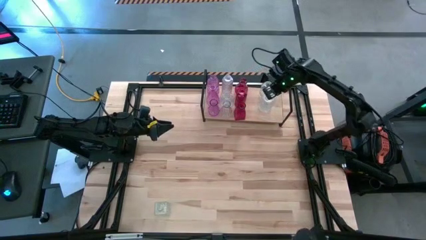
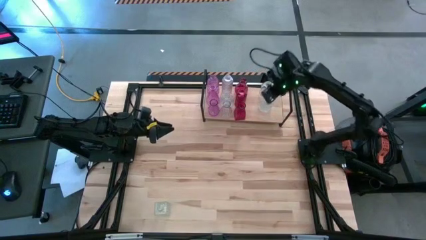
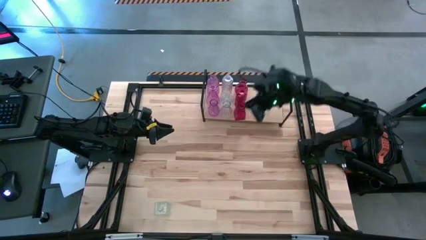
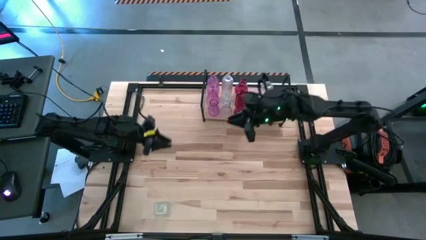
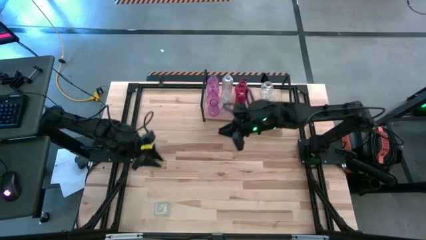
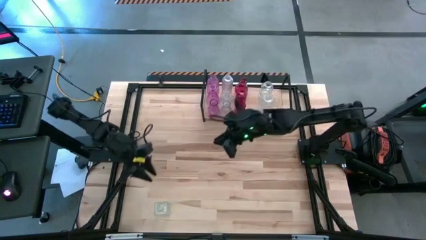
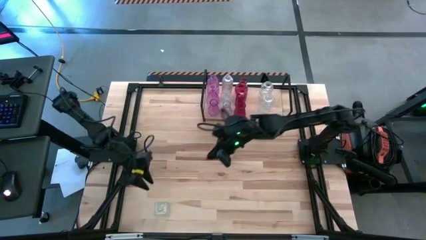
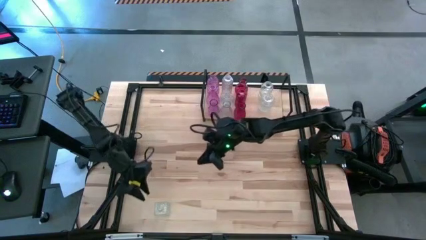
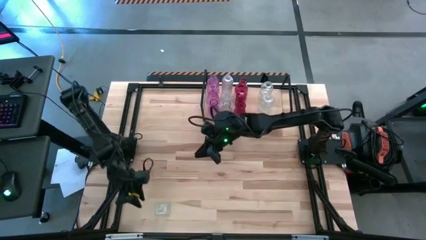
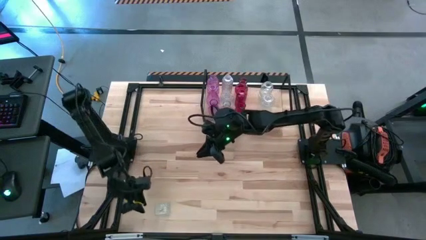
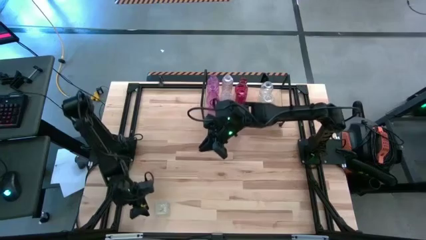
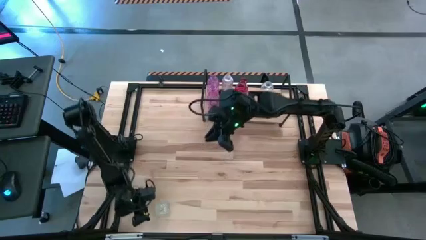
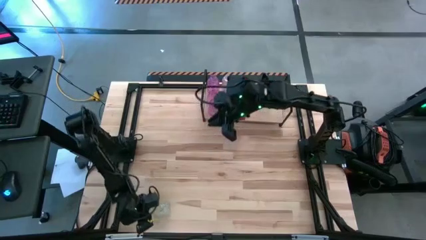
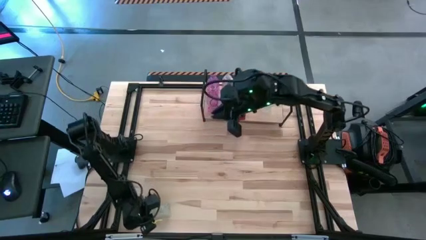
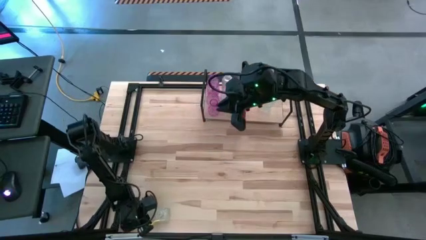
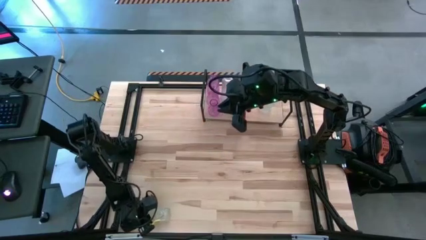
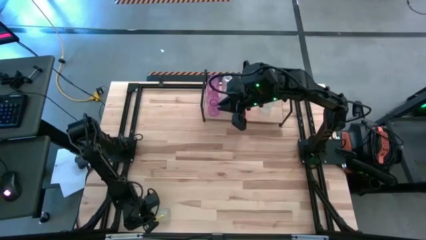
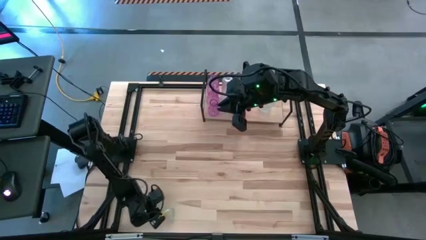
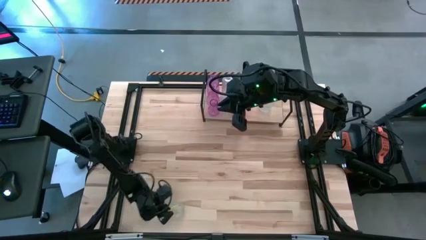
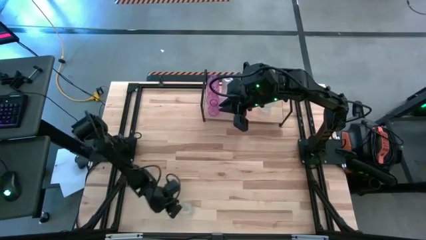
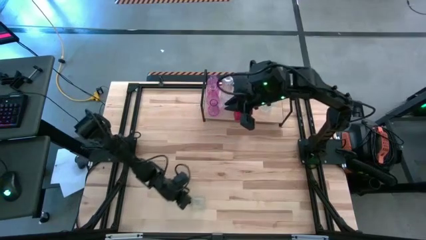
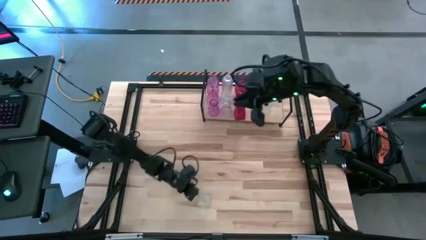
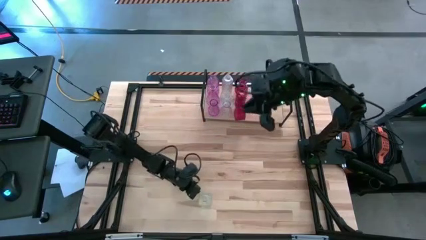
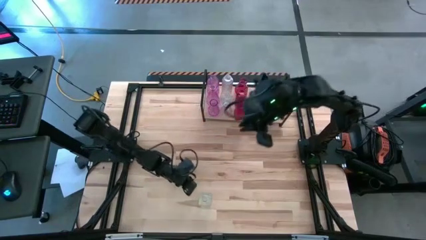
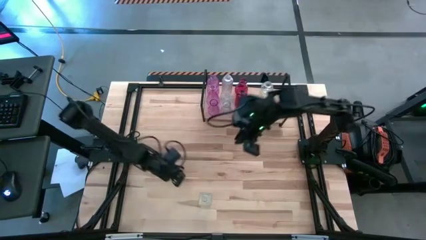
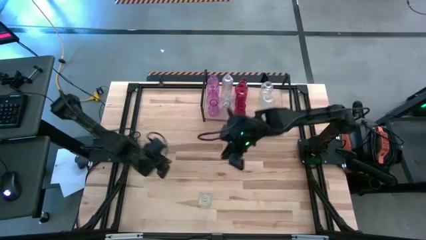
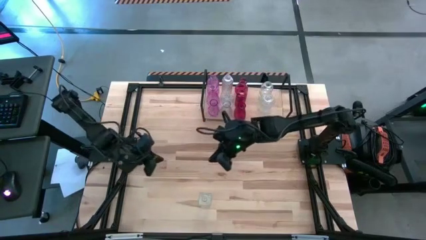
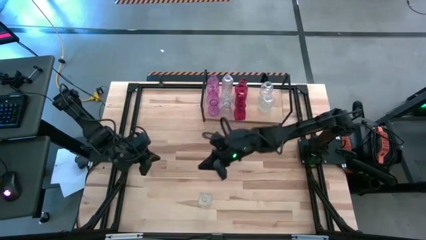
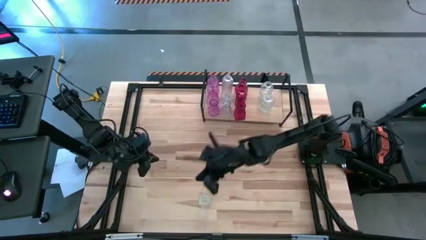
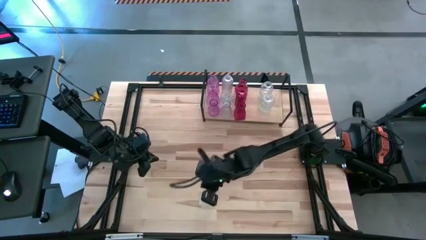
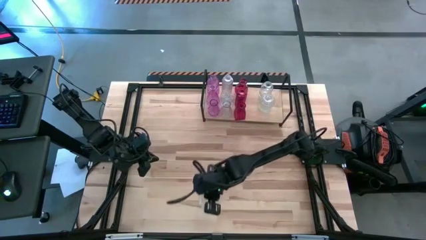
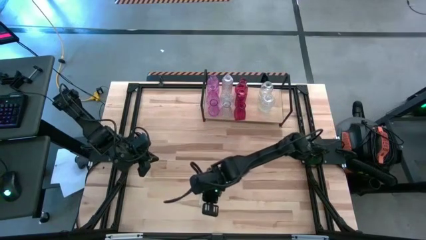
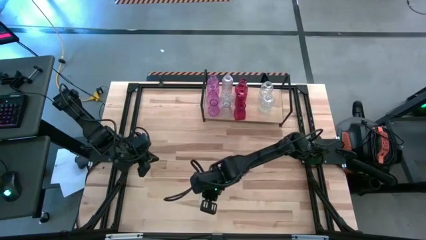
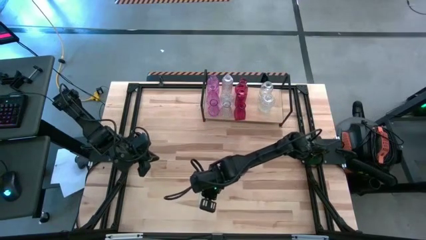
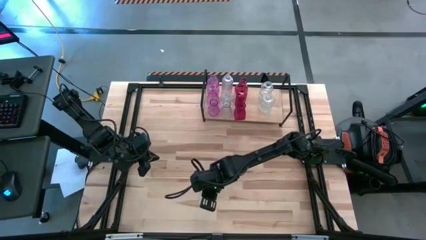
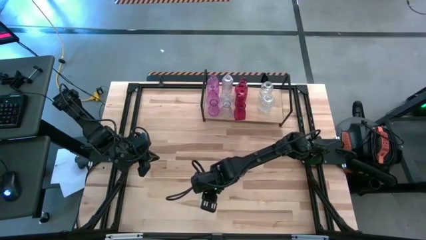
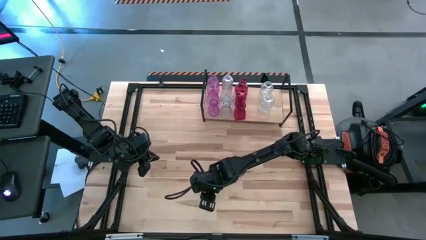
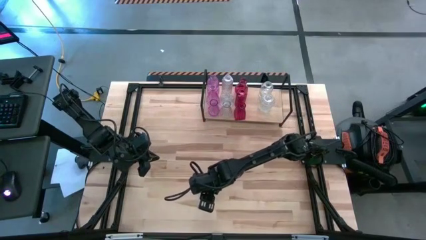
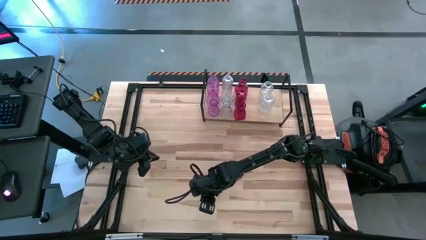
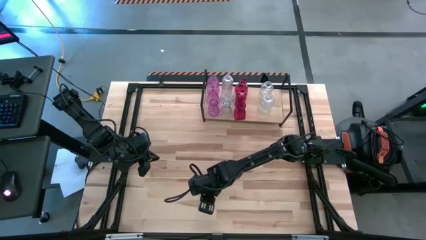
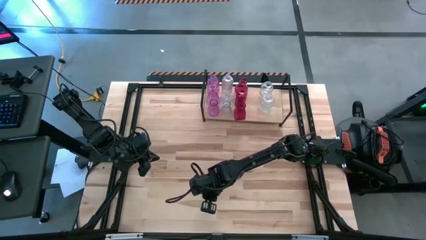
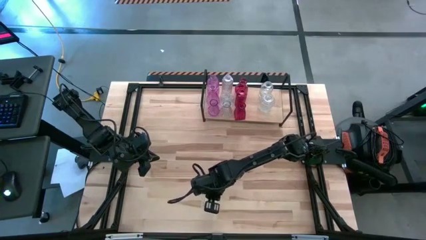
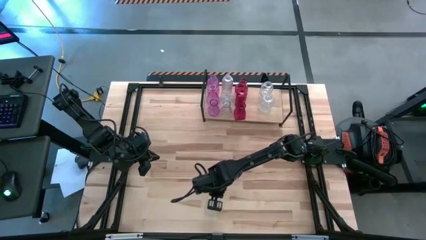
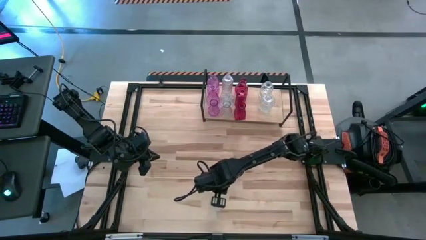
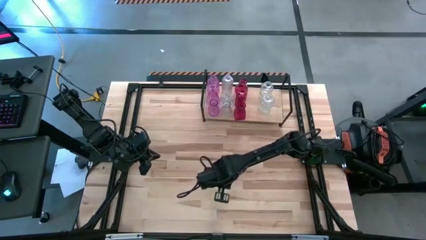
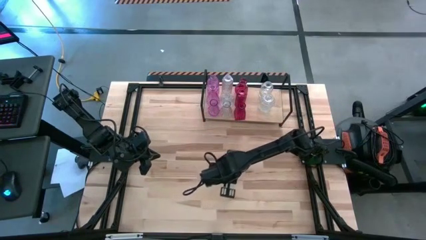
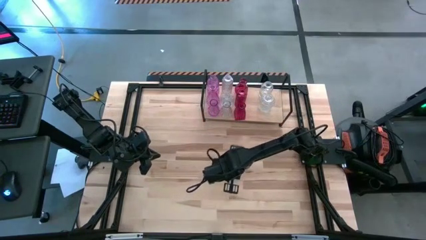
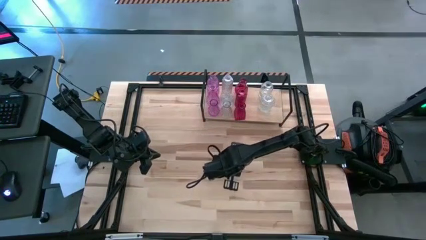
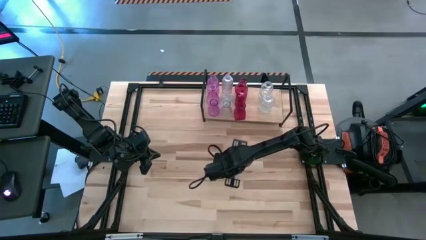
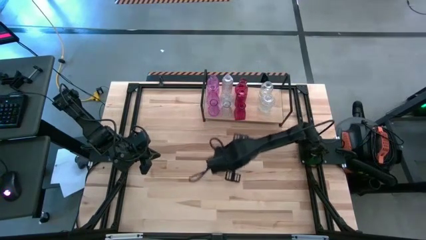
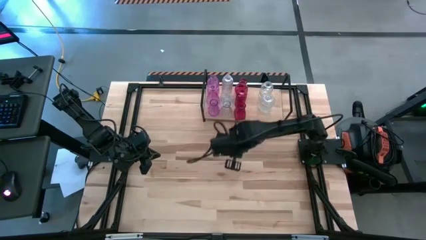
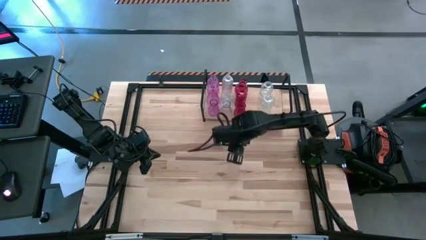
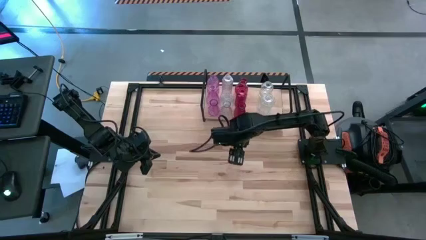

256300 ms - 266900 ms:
Task: sort vases onto shelf
Align the transparent vase with the other transparent vase on the shelf

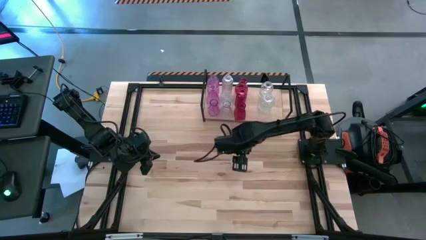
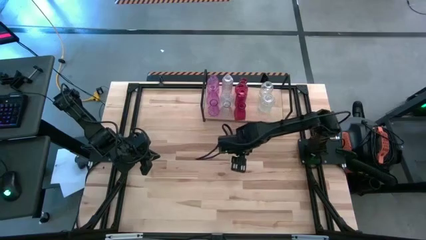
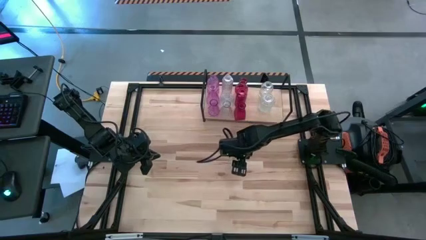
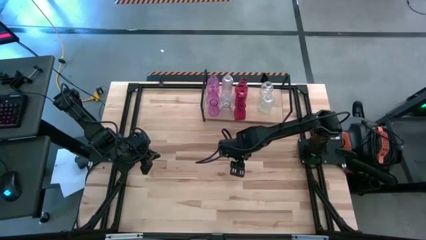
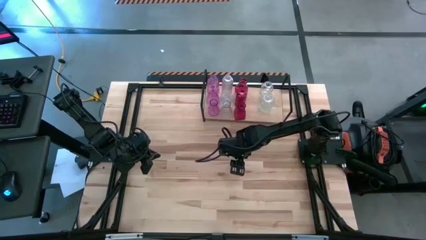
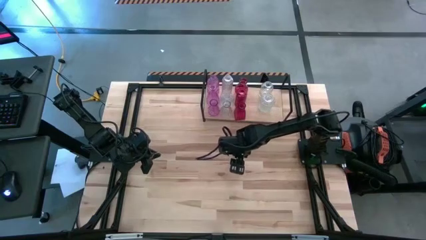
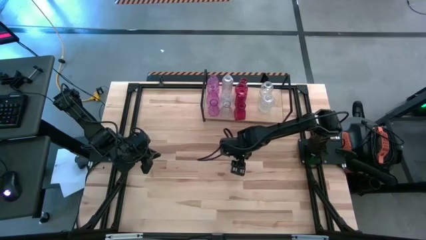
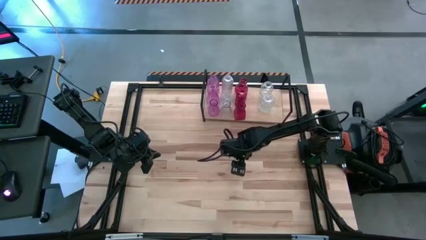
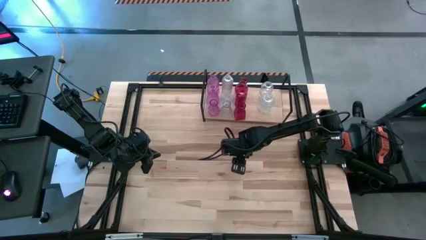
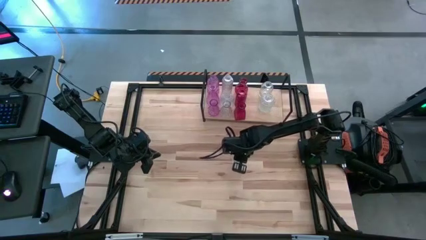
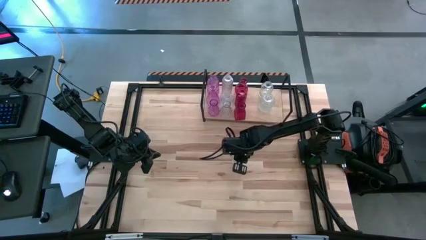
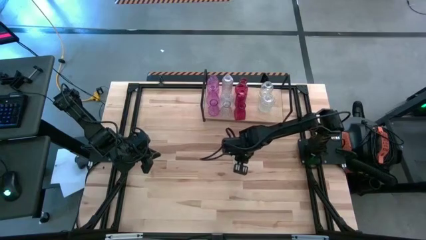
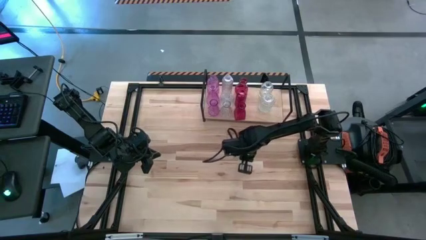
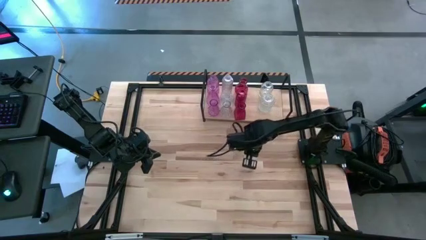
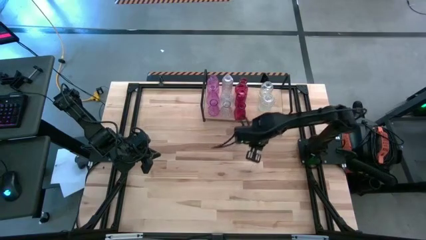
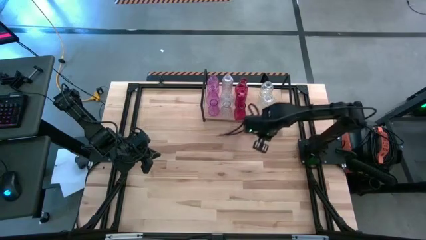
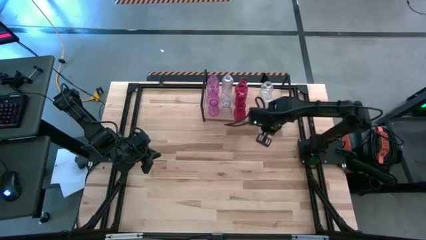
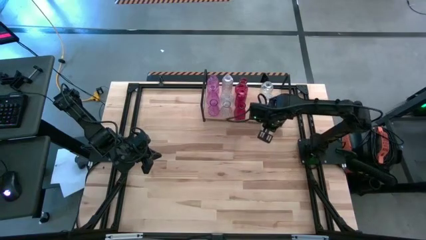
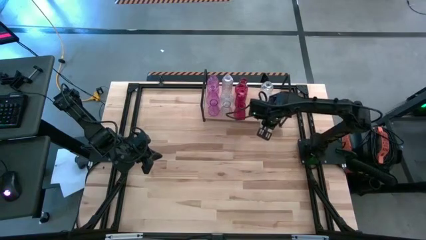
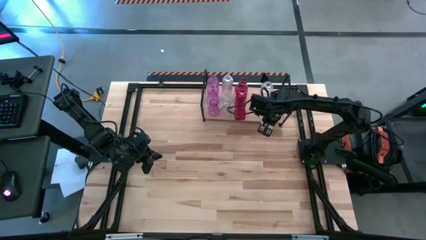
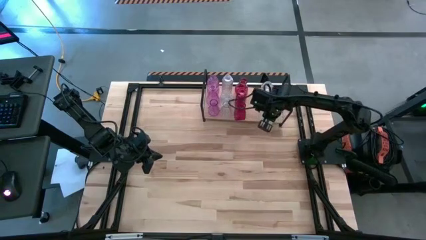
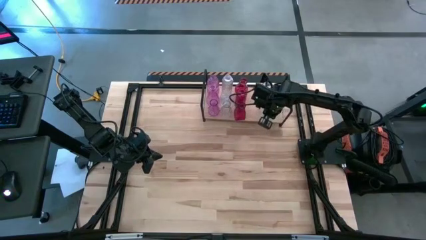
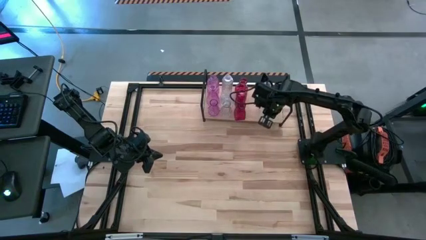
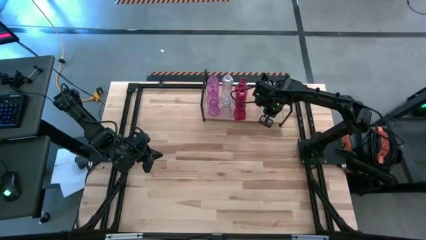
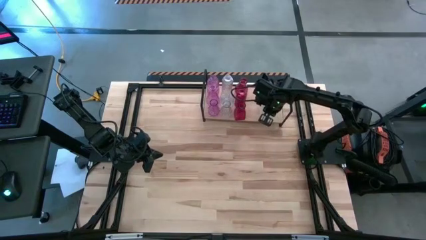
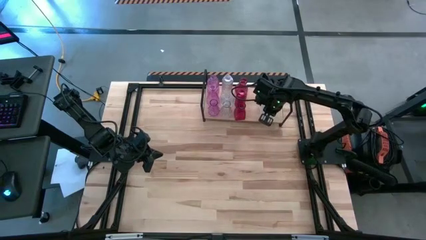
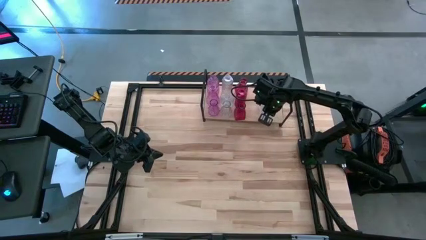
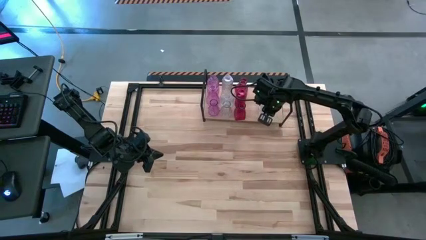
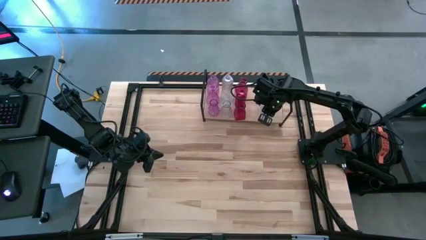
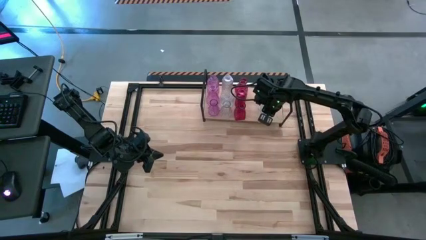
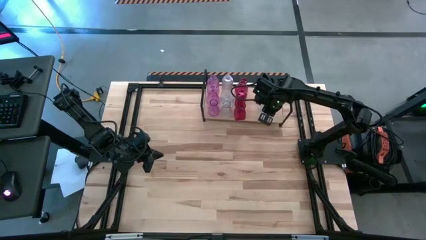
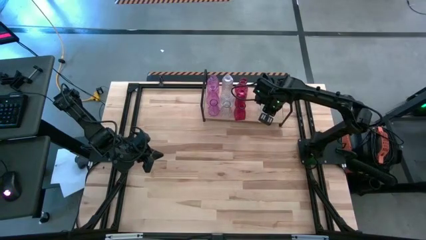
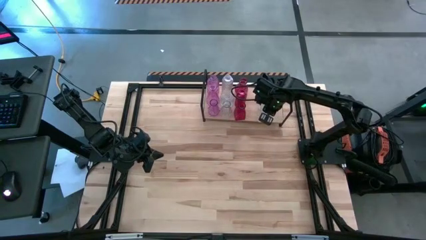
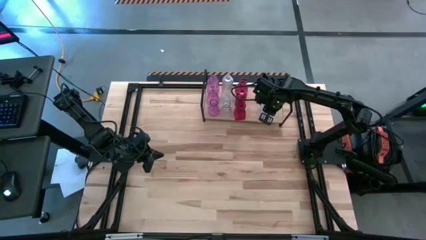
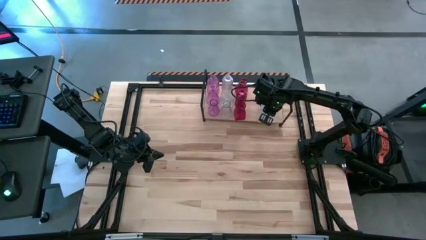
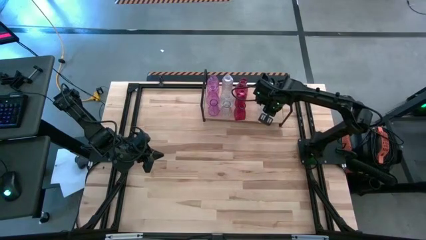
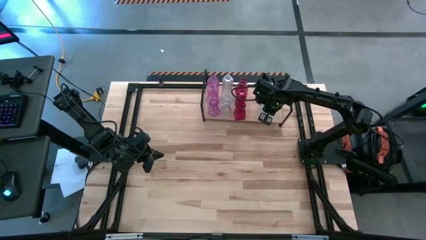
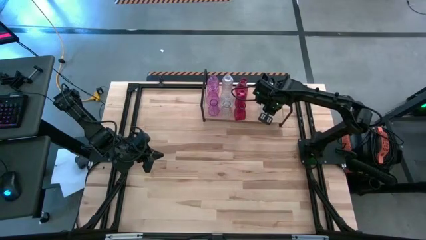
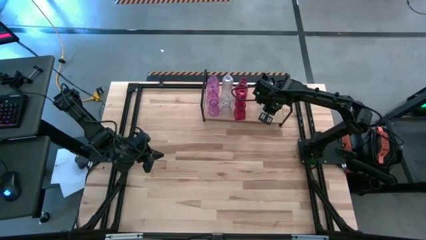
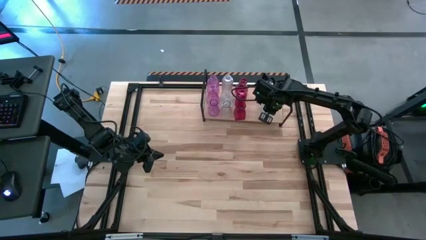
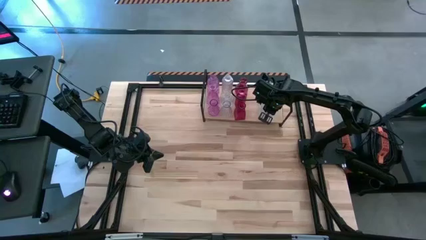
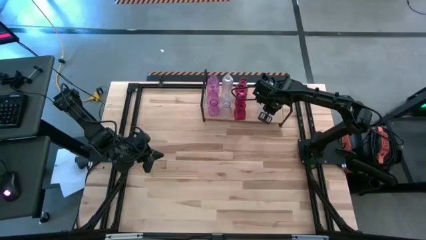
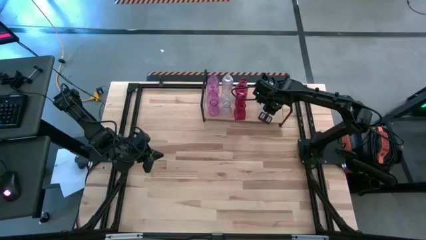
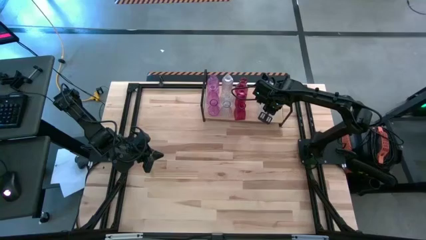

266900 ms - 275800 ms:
Align the transparent vase with the other transparent vase on the shelf
